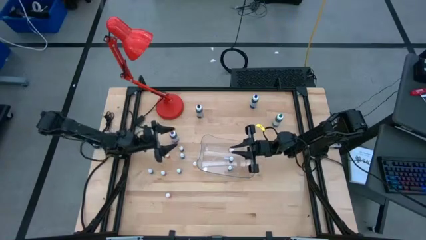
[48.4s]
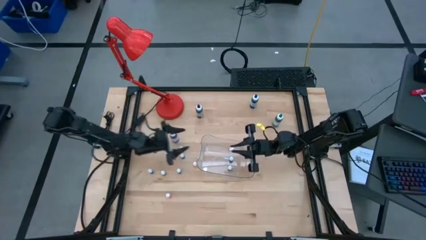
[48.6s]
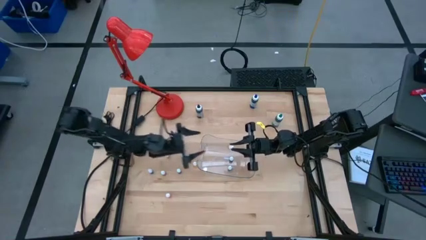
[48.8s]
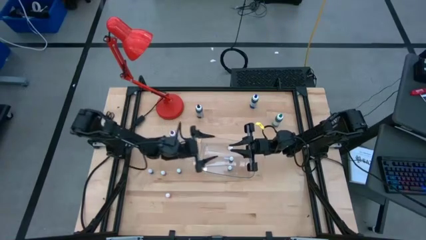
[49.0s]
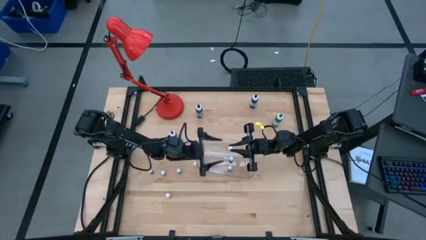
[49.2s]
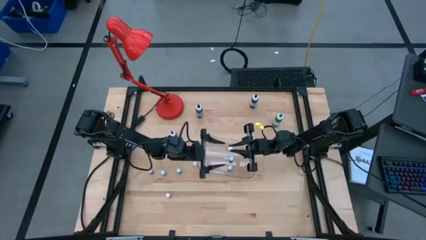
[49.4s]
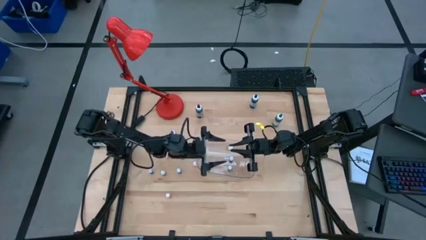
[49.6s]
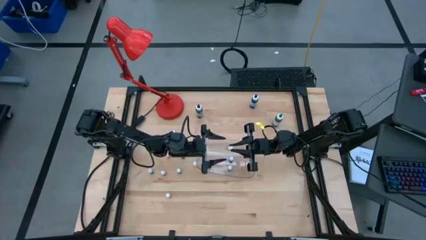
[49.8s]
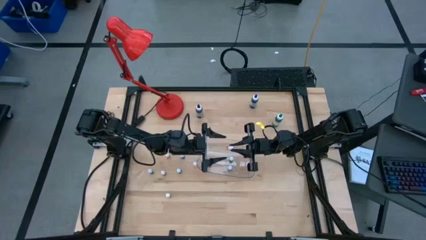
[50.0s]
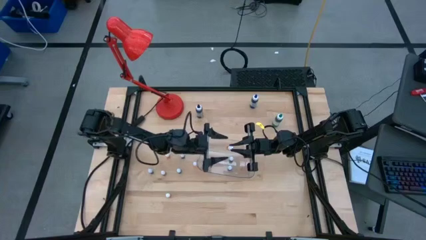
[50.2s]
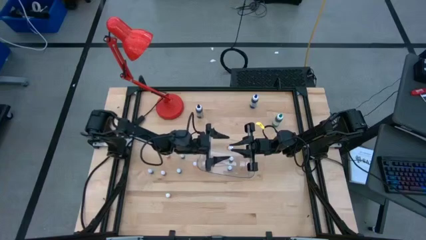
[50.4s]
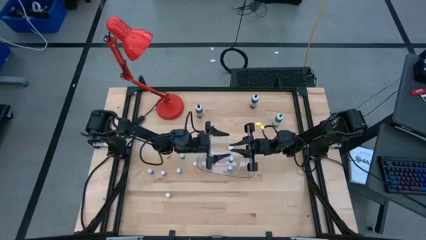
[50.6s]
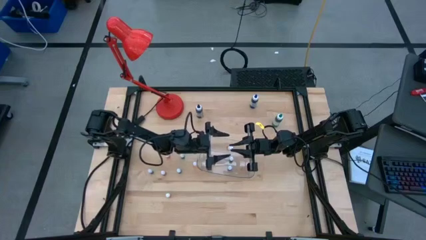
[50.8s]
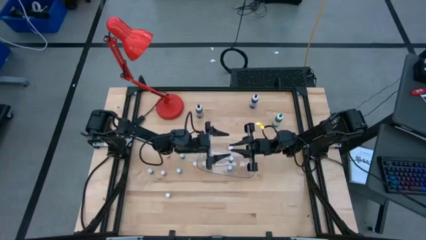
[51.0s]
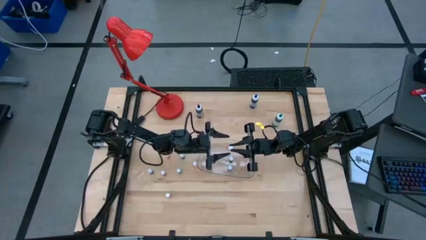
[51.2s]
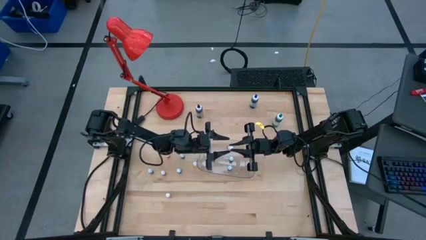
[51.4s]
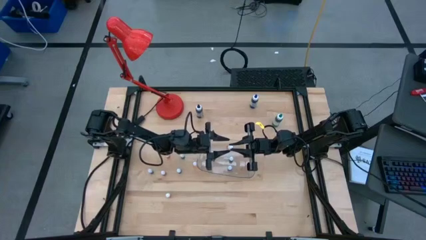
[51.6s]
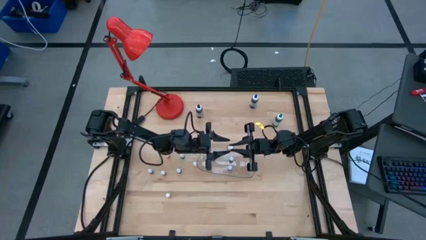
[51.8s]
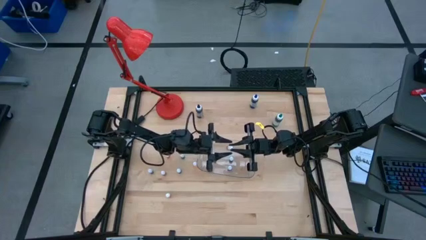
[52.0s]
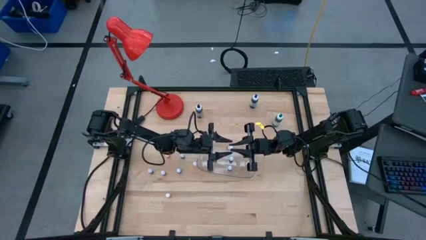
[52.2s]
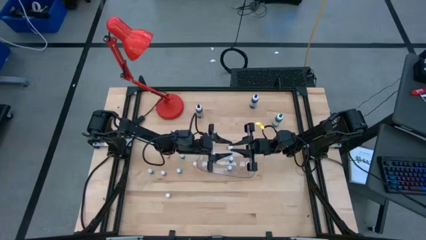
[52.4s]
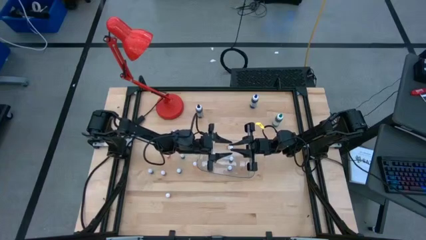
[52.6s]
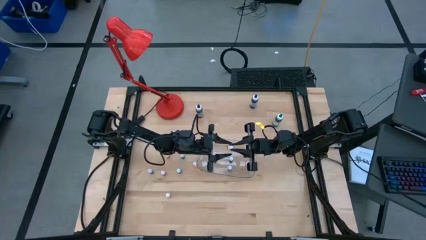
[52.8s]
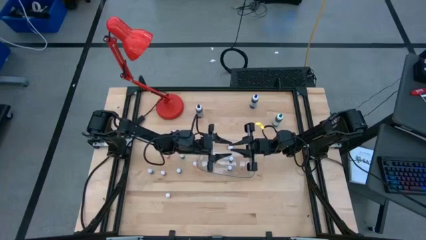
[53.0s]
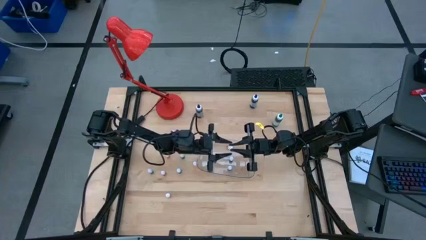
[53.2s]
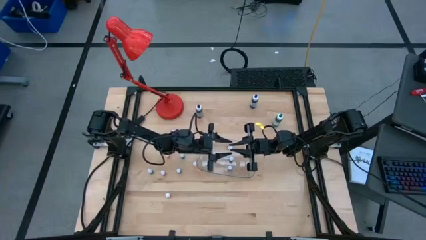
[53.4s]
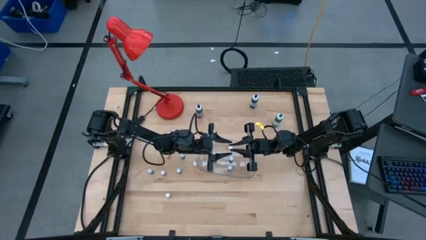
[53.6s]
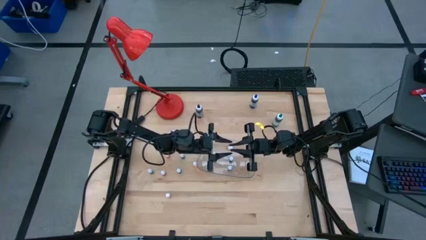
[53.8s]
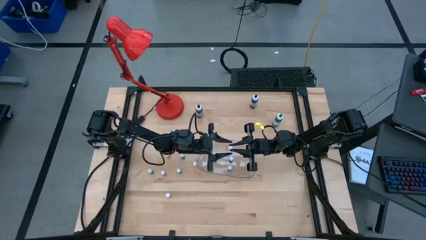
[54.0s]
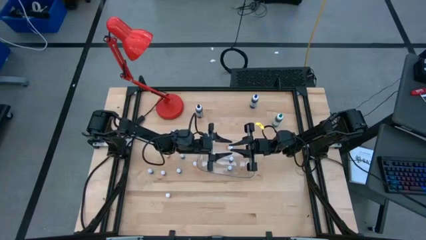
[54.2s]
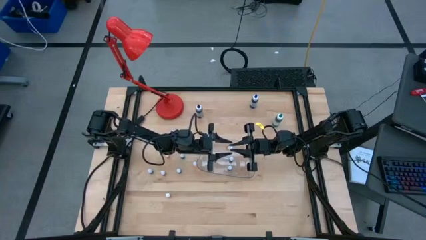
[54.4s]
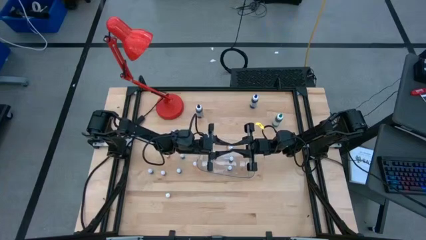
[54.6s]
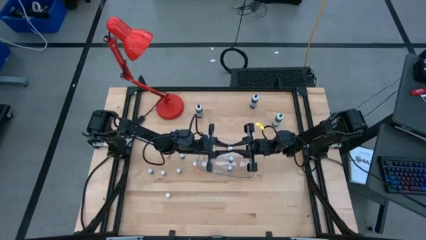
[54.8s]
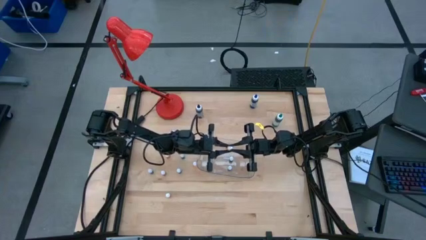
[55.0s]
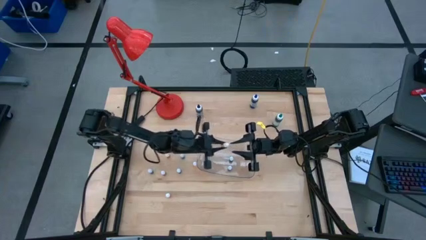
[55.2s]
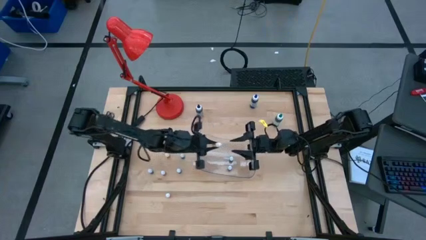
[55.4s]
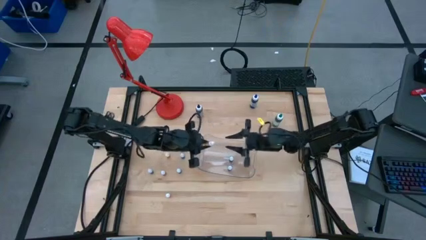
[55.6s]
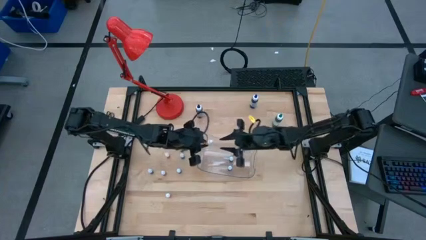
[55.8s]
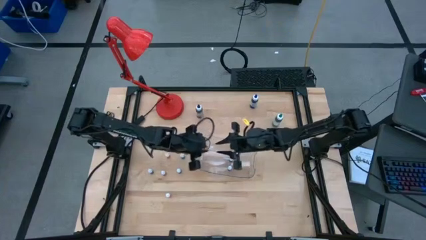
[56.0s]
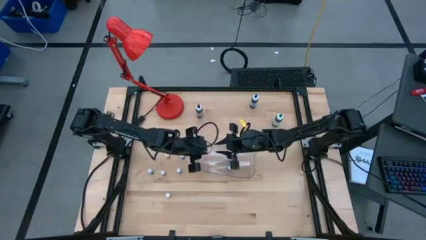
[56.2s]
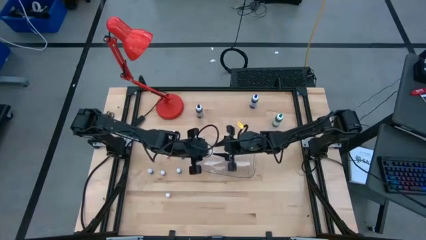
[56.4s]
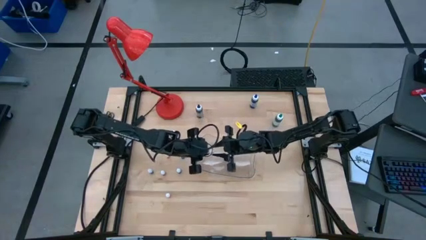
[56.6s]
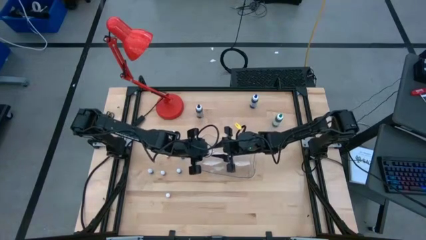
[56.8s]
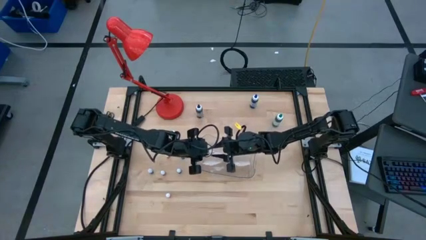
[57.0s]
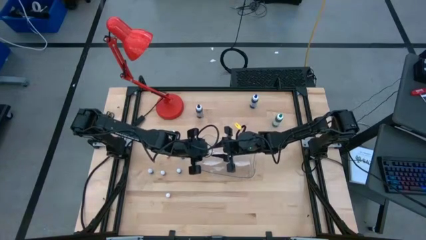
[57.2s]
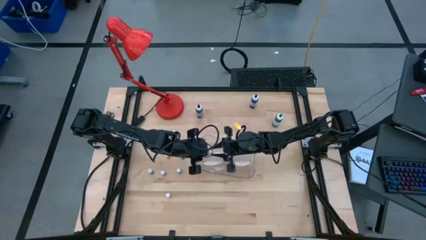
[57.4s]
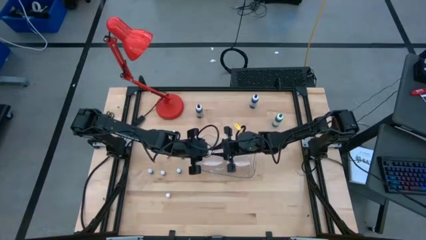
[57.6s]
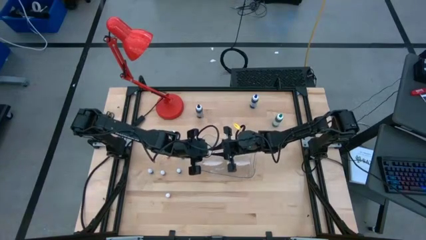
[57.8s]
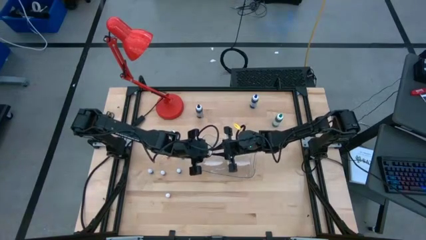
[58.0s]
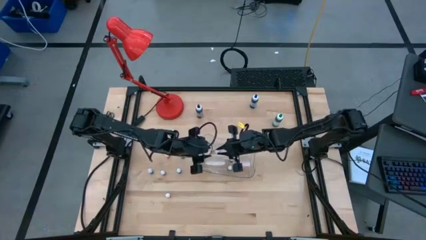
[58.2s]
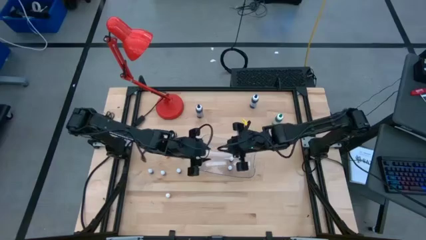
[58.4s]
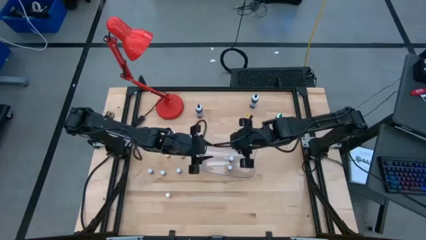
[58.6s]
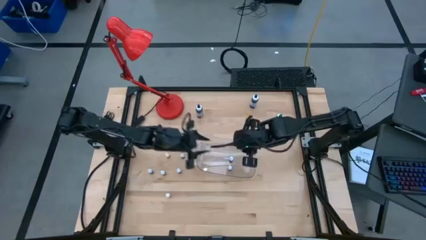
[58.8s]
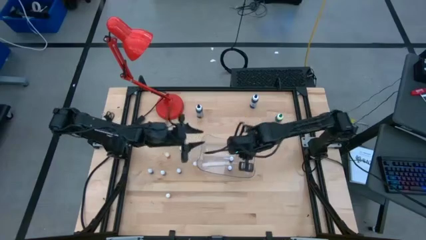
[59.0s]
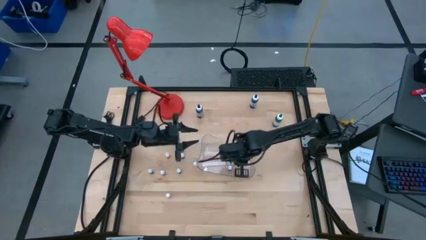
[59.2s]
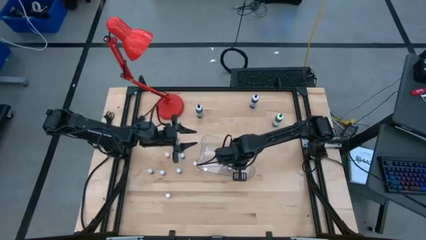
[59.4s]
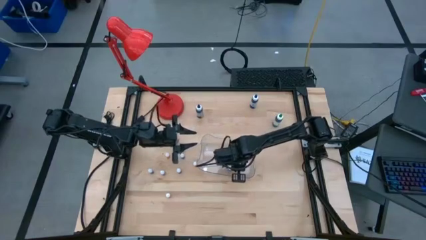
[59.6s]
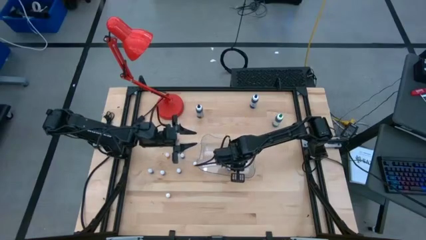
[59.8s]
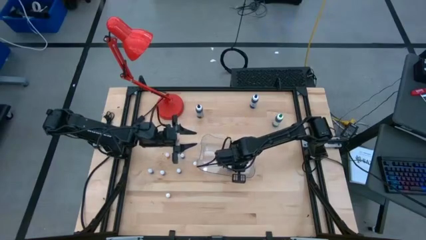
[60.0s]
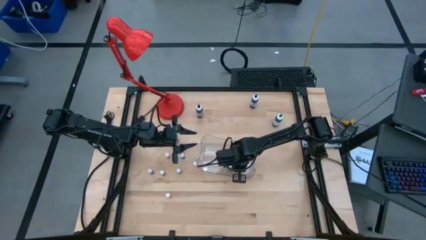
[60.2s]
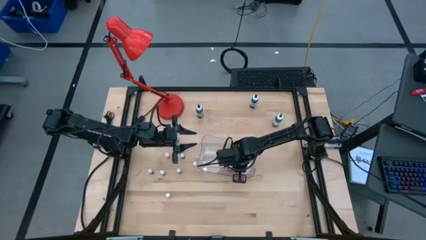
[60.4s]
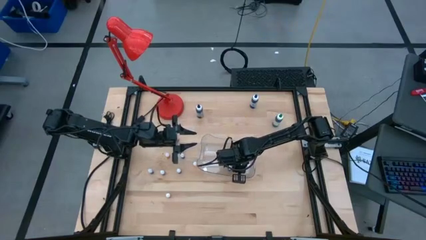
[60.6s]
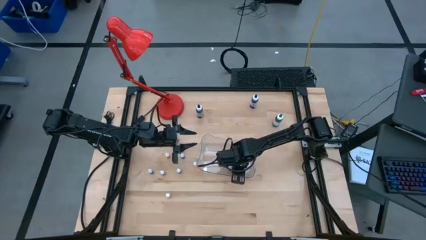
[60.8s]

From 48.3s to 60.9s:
Task: Pick & Place food coloring
Put the small orange food coloring bottle into the transparent bin
